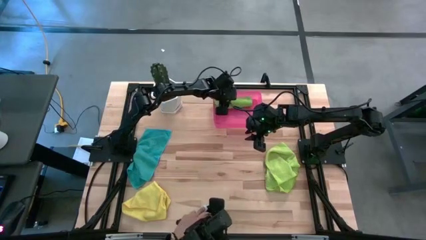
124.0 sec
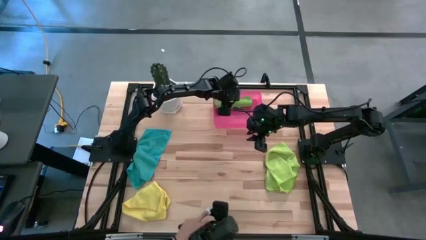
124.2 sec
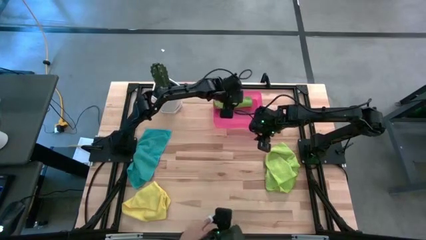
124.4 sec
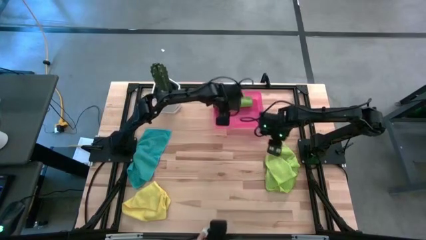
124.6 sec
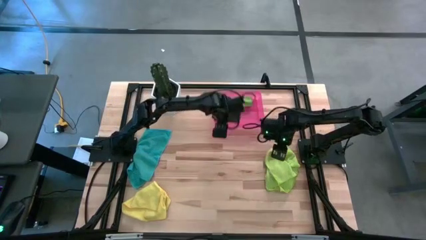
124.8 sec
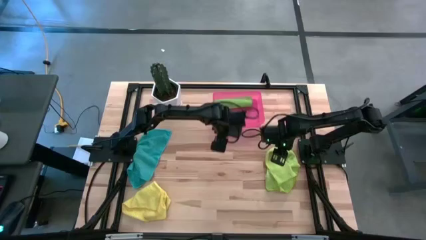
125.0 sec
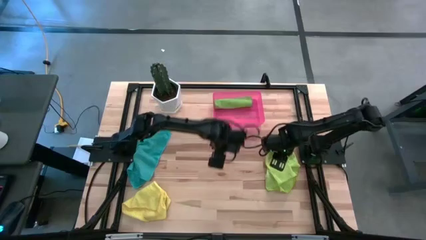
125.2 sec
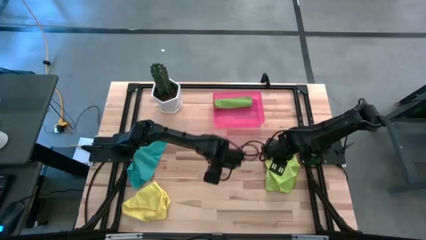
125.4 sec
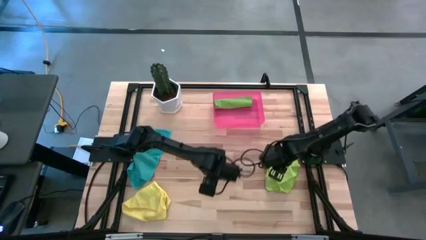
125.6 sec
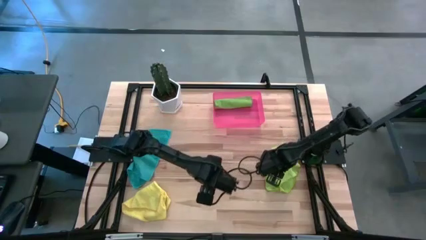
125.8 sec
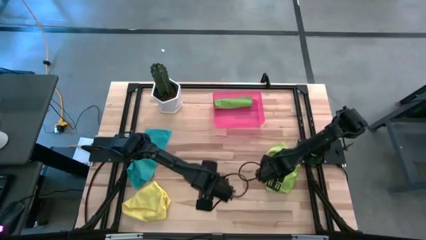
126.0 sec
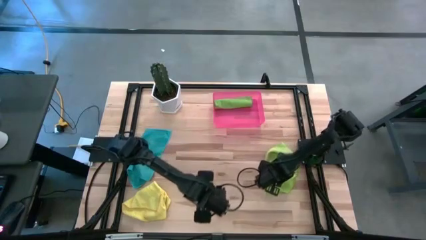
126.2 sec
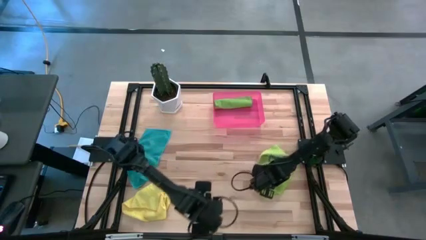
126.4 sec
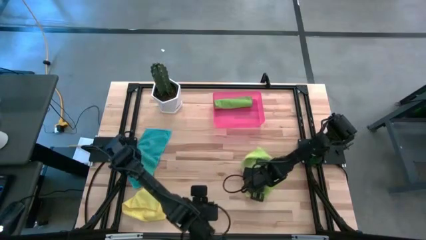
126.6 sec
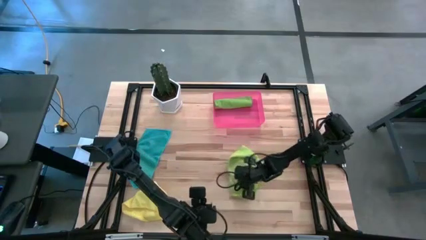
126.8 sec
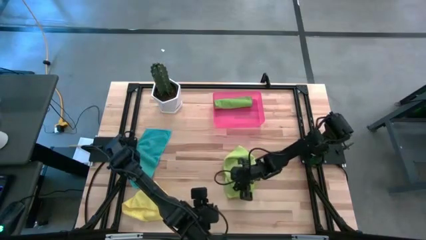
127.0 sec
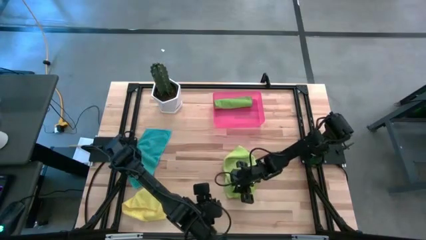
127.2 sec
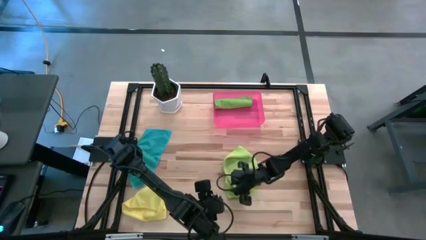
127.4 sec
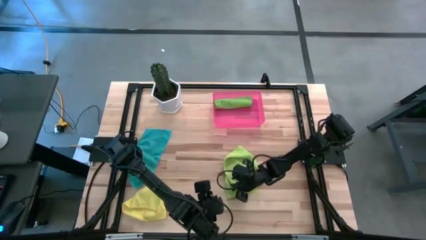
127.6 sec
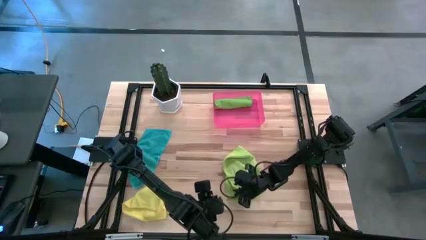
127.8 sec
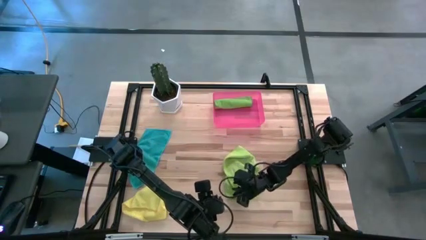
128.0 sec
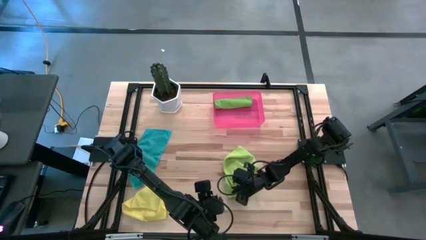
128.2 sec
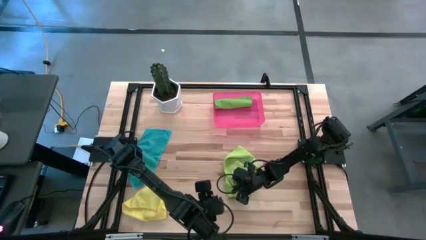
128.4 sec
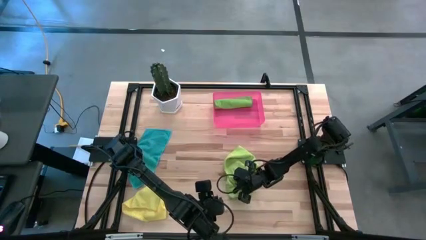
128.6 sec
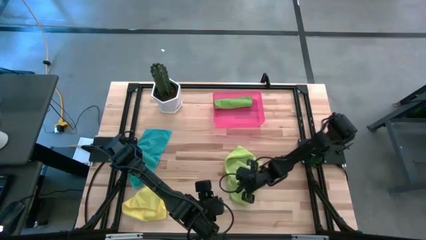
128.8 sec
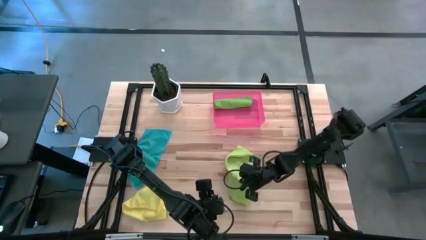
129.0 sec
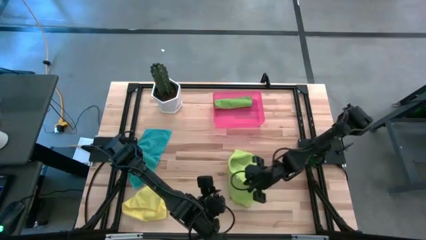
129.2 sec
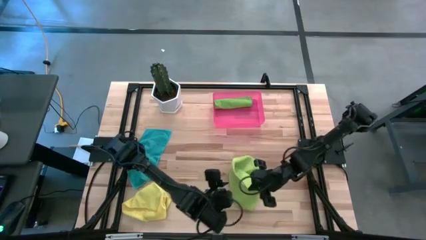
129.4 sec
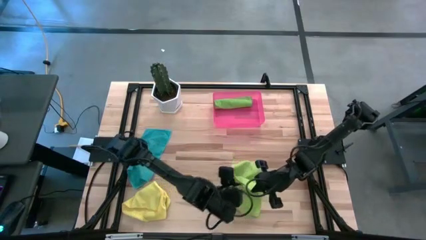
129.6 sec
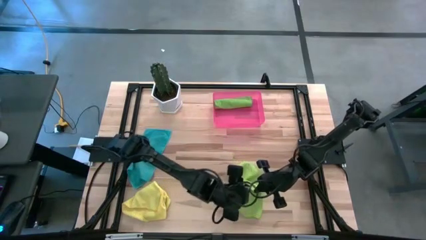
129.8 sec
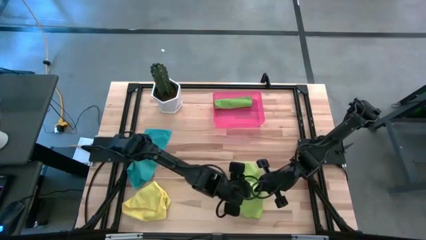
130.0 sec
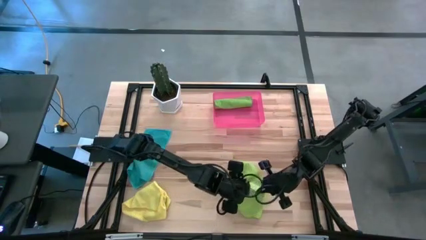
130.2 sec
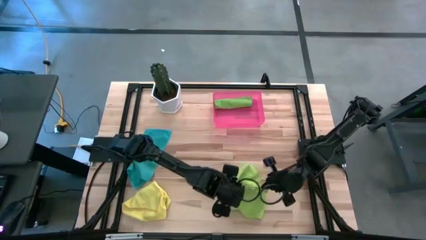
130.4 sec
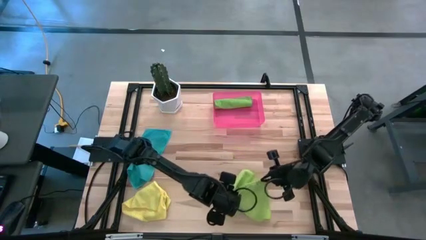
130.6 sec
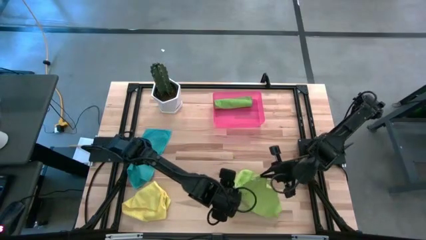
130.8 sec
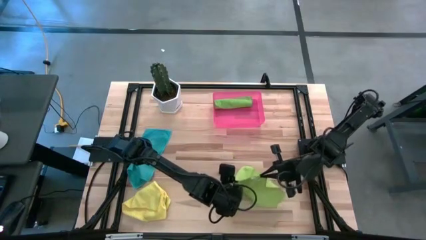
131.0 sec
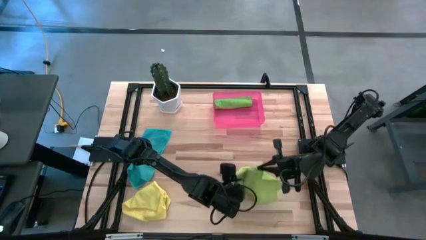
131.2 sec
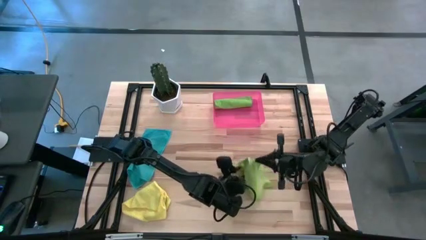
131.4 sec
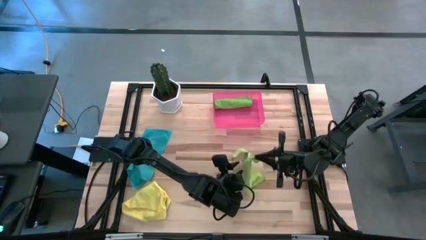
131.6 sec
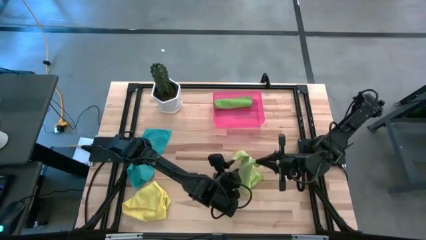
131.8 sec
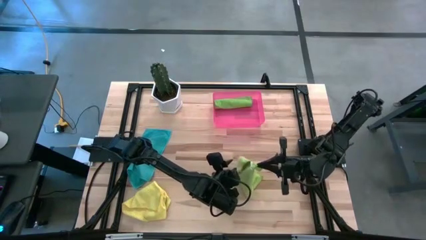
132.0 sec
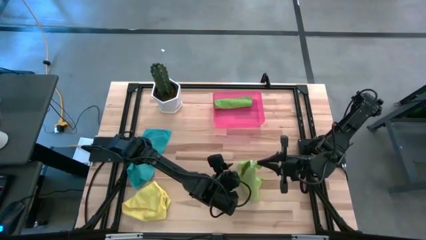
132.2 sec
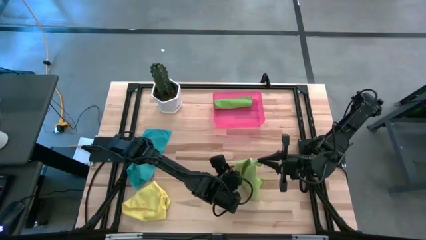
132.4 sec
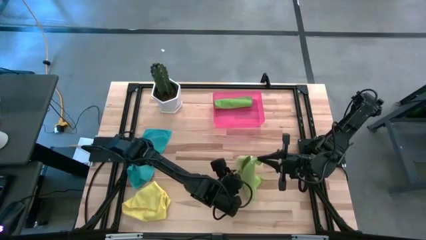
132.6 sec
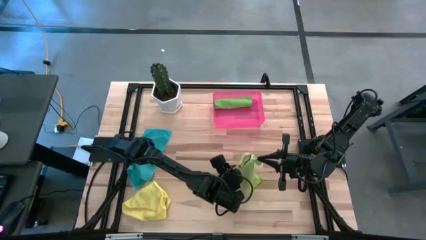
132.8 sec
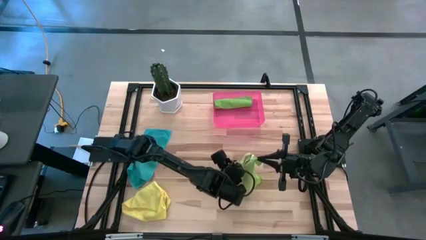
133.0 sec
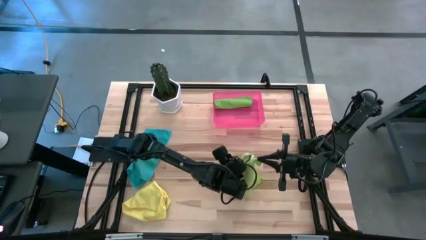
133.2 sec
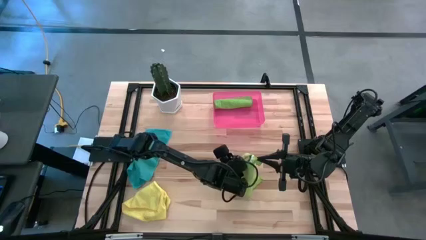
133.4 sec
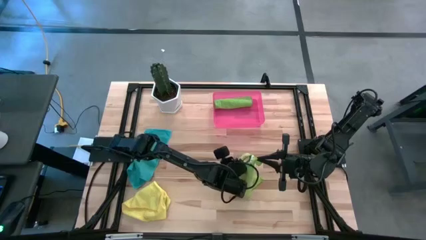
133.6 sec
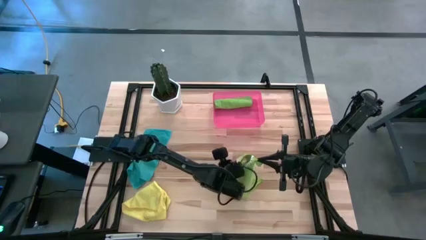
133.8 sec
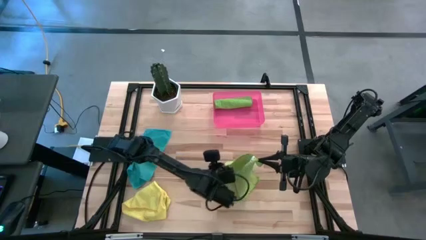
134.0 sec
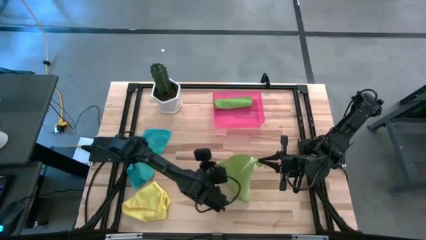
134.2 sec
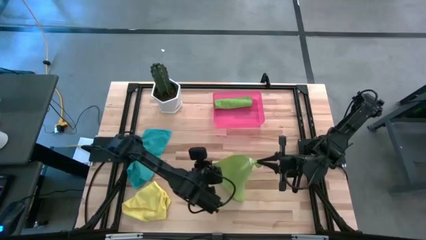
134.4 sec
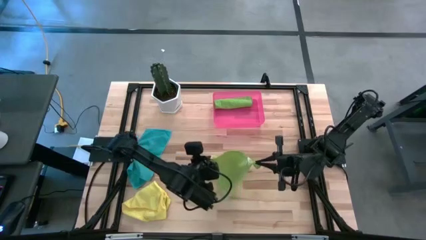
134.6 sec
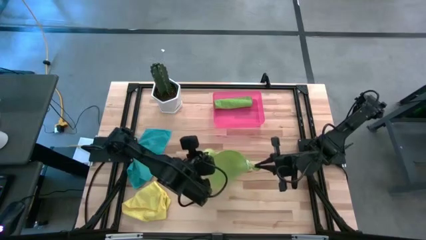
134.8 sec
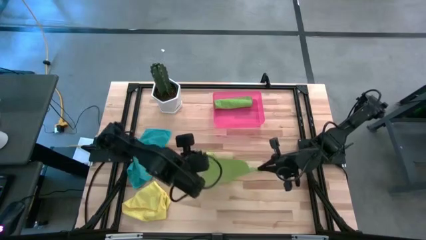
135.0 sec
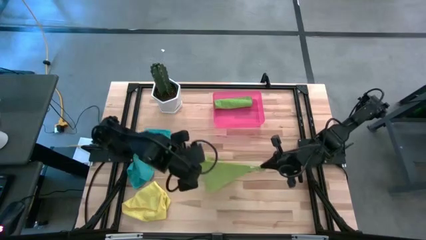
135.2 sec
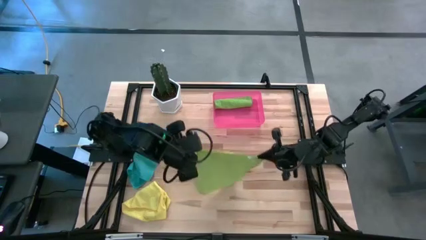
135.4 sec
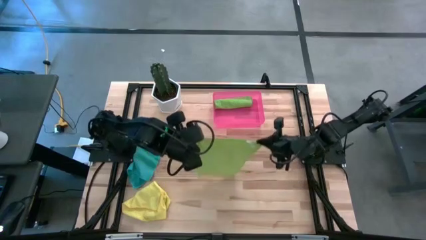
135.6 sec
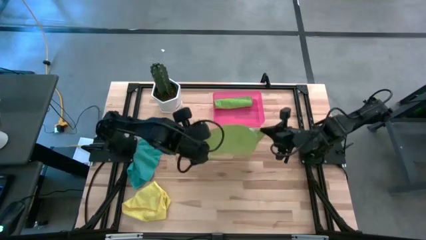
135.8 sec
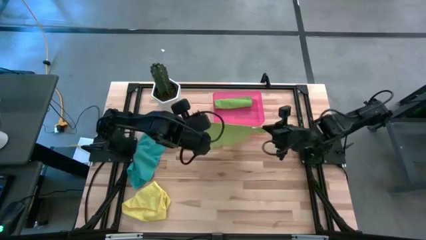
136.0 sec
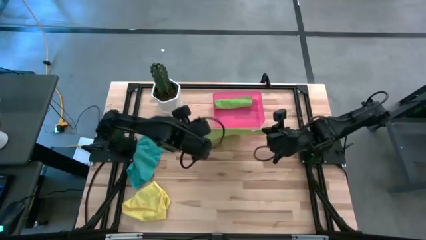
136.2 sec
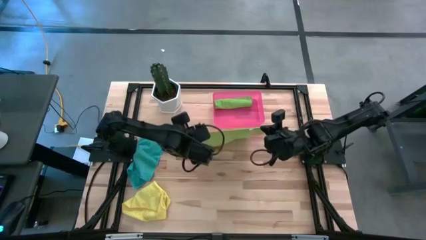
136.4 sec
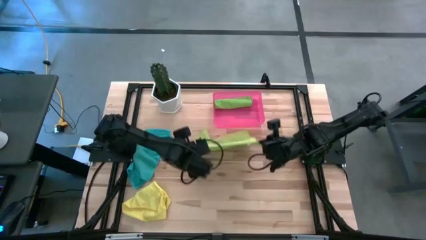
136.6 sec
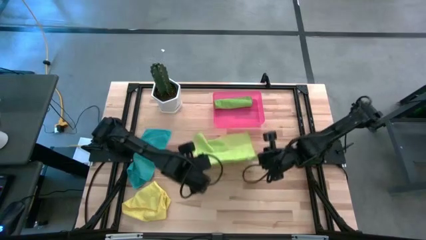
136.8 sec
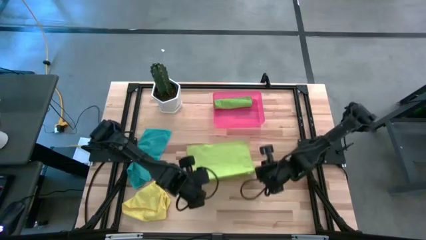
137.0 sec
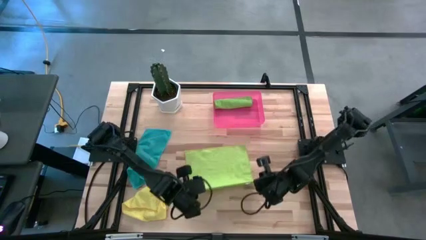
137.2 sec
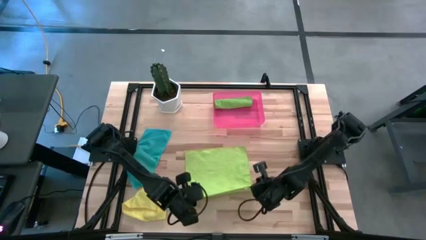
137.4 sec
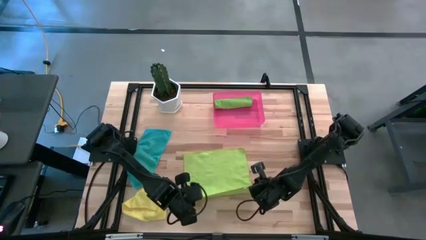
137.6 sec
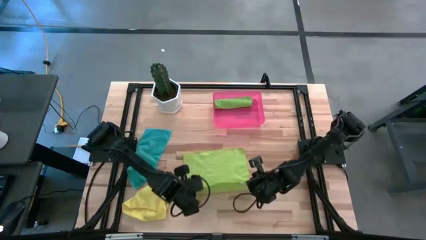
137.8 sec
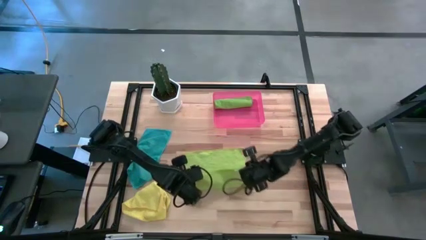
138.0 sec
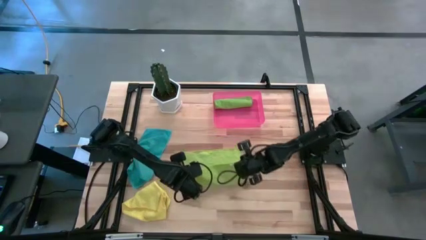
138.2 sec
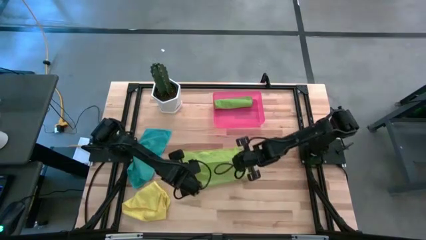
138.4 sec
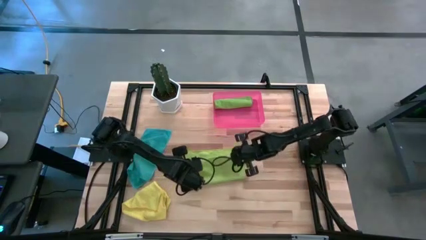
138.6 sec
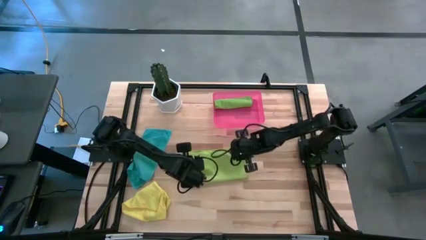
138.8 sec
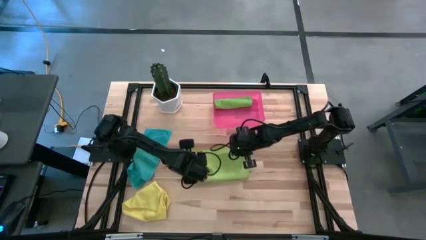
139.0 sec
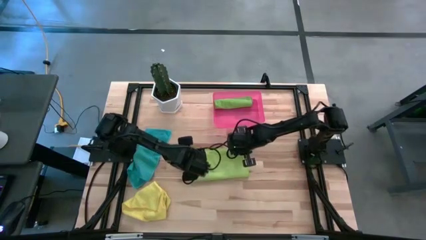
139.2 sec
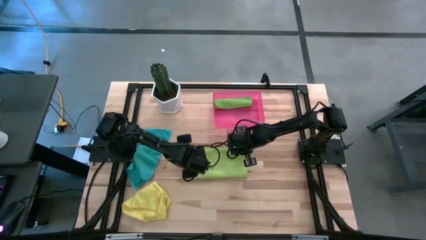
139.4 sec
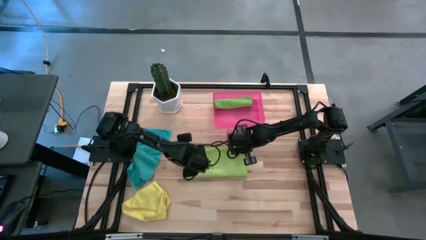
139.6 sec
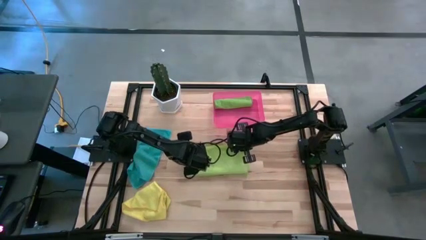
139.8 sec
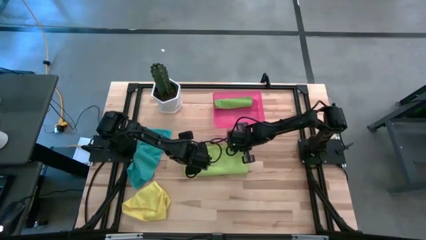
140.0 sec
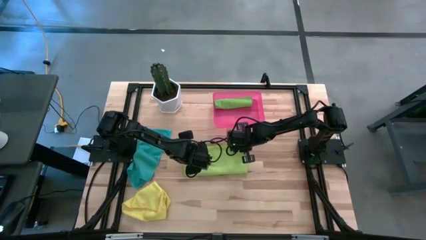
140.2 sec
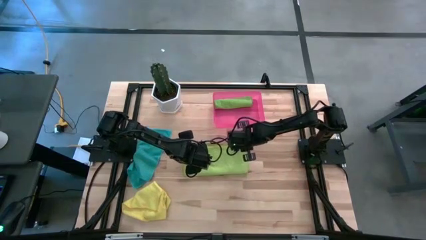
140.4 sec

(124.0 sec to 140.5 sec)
Task: Roll microfiber towels into tight, uniform cylinder then place into a basket
Roll the light green microfiber cloth
